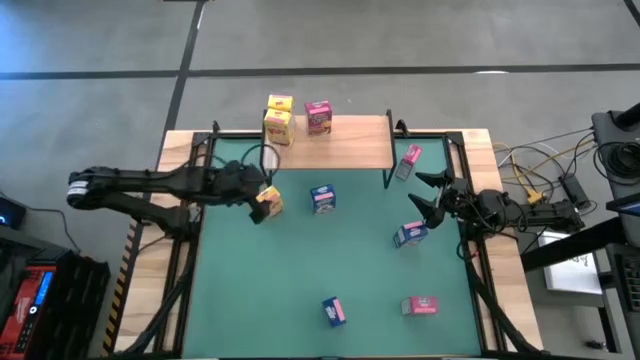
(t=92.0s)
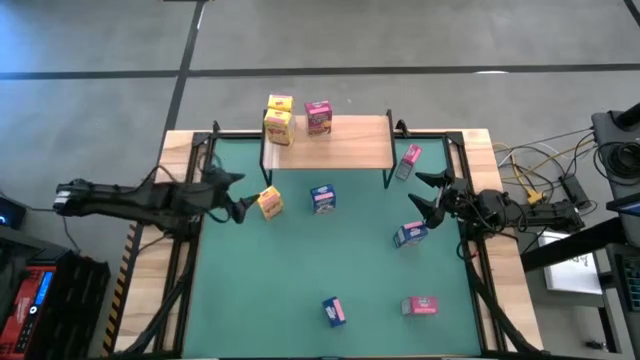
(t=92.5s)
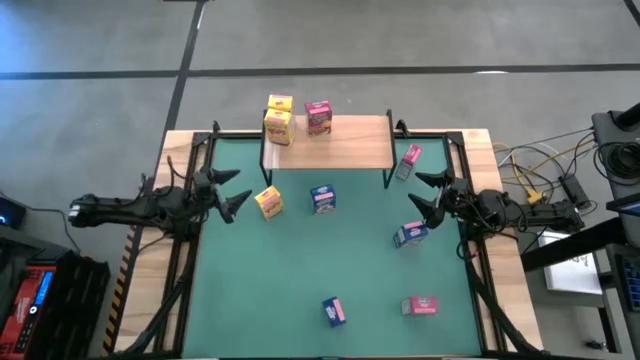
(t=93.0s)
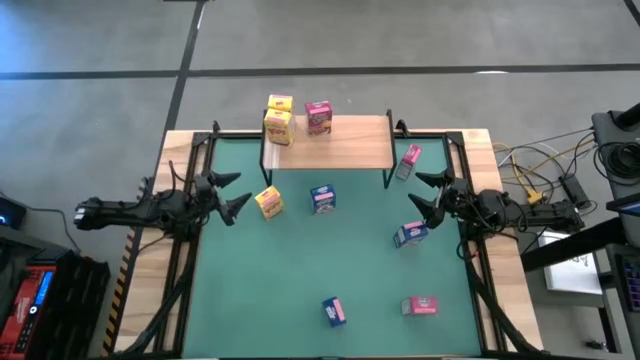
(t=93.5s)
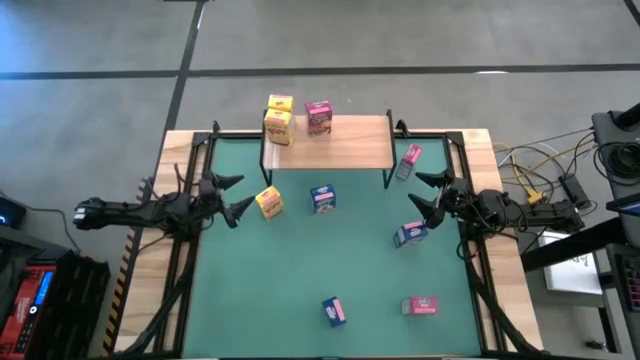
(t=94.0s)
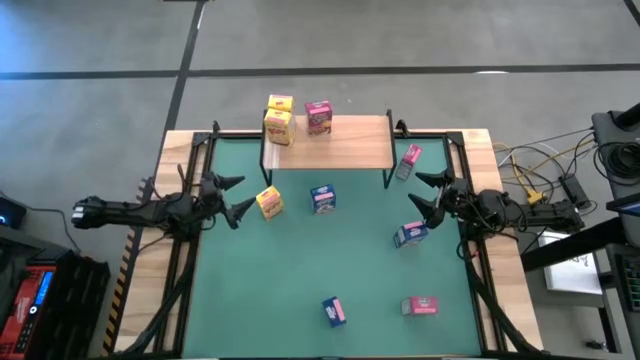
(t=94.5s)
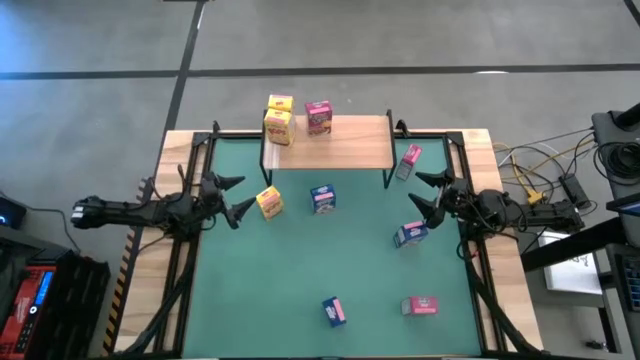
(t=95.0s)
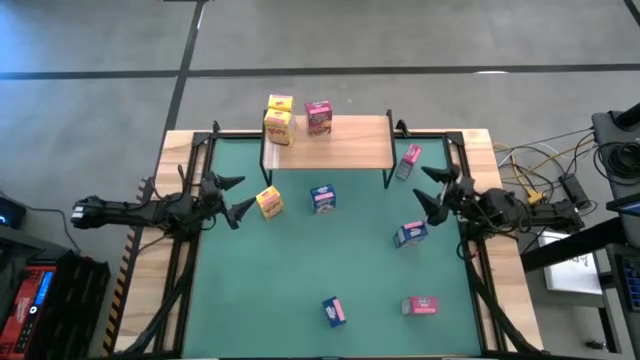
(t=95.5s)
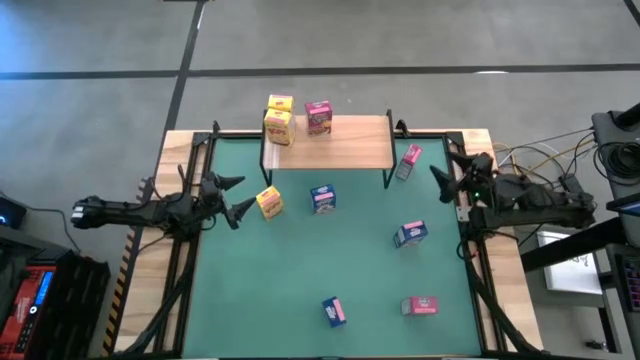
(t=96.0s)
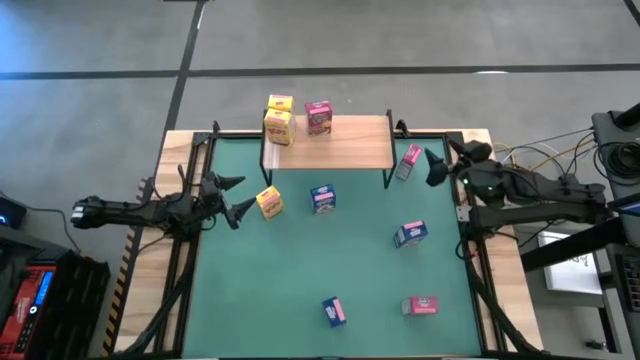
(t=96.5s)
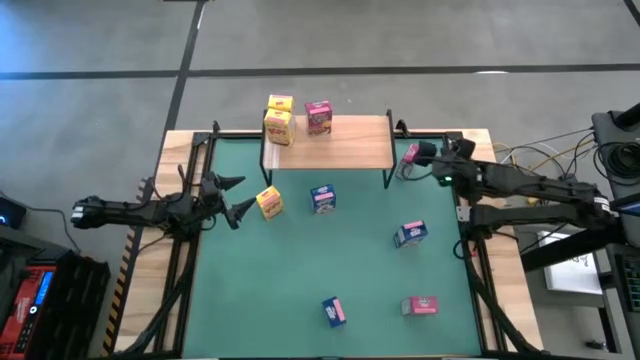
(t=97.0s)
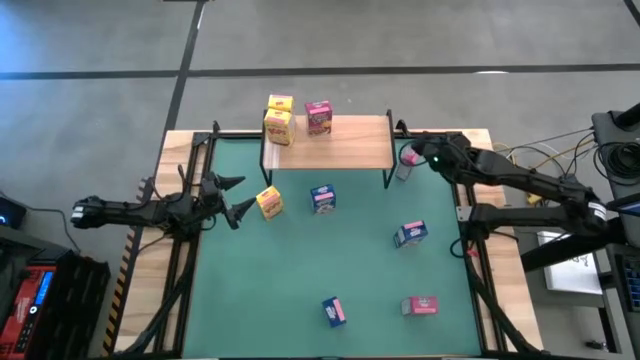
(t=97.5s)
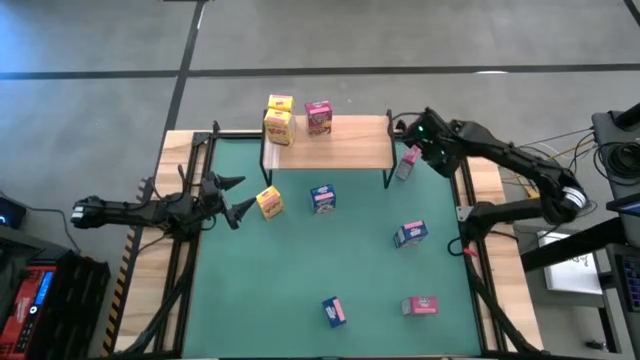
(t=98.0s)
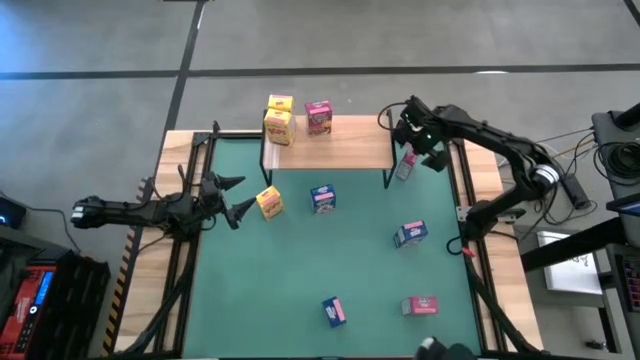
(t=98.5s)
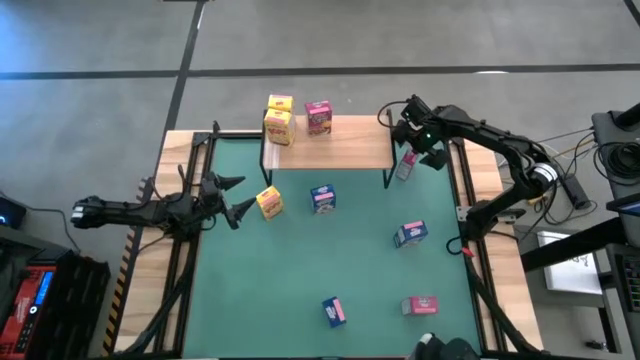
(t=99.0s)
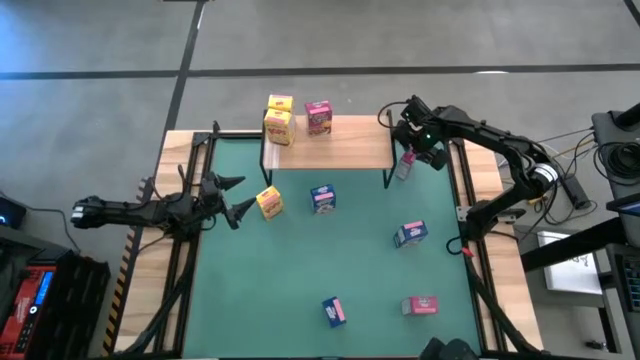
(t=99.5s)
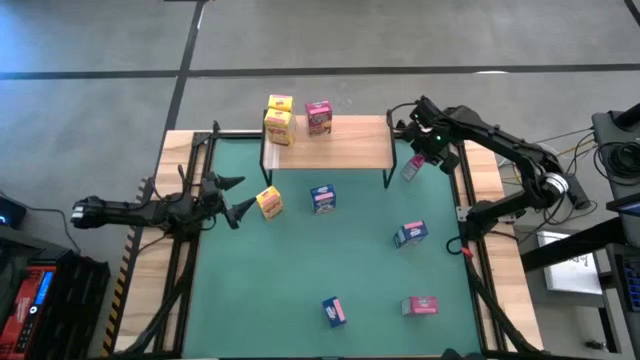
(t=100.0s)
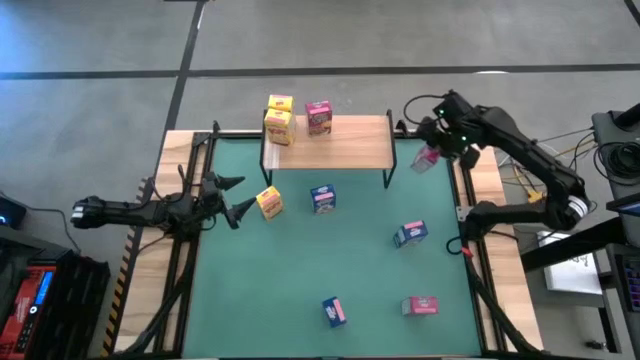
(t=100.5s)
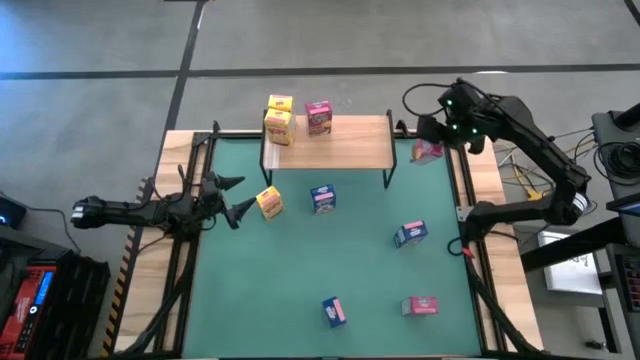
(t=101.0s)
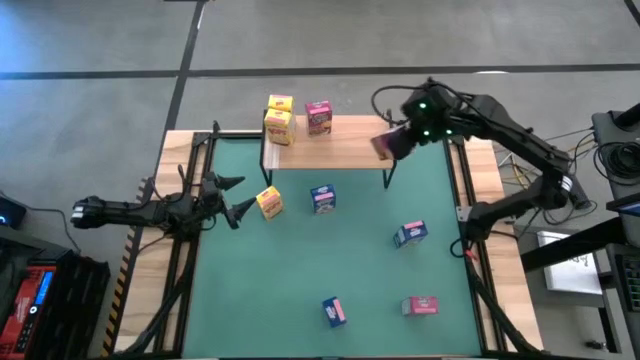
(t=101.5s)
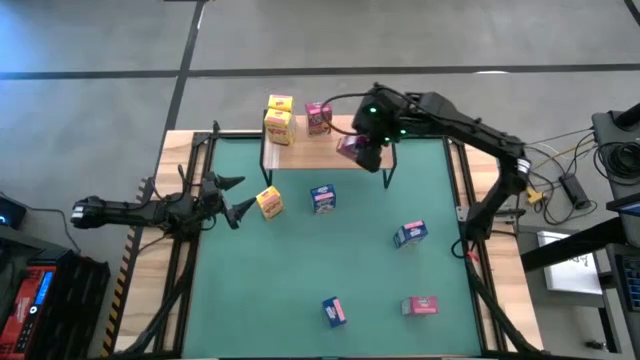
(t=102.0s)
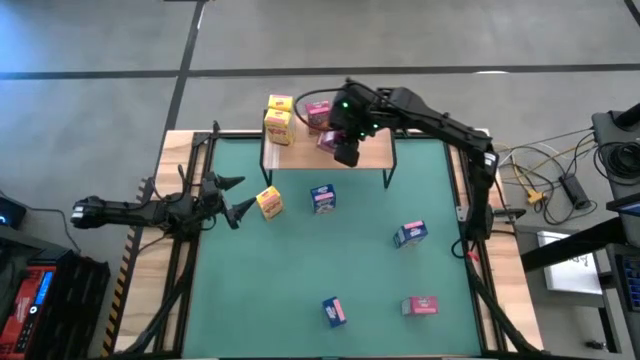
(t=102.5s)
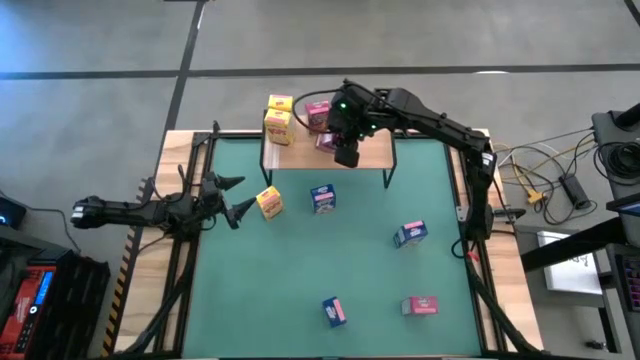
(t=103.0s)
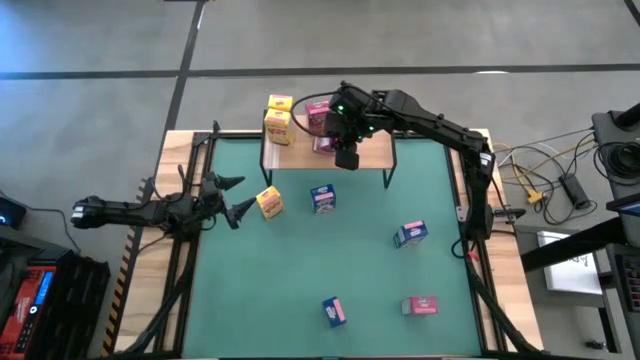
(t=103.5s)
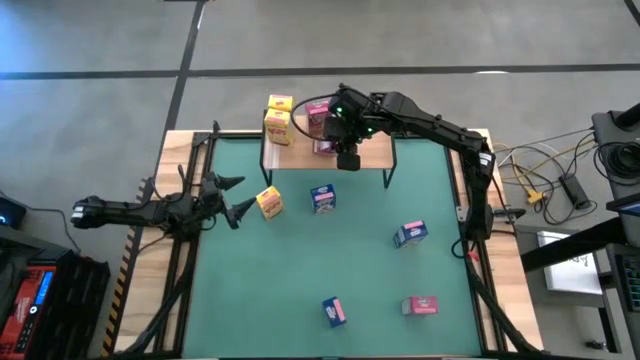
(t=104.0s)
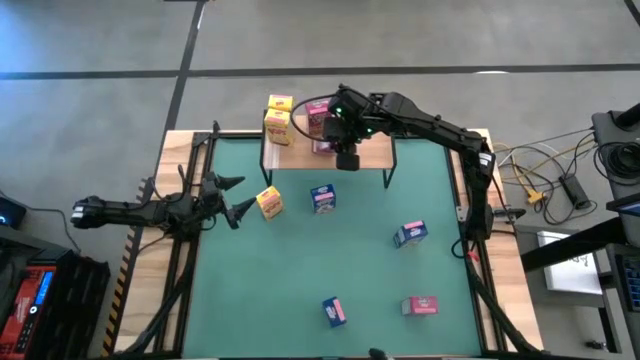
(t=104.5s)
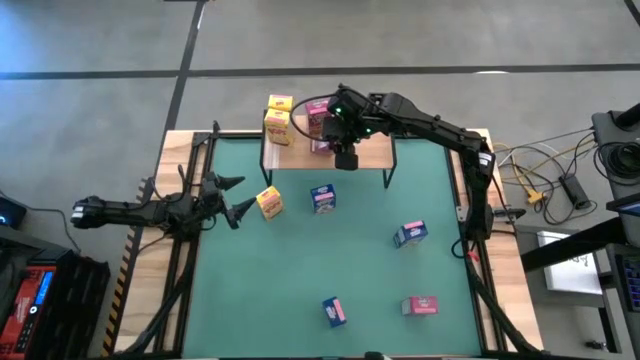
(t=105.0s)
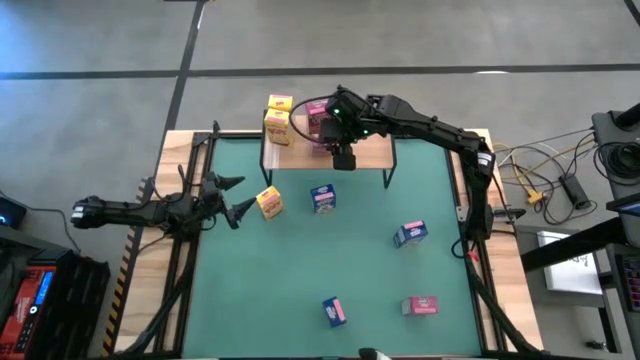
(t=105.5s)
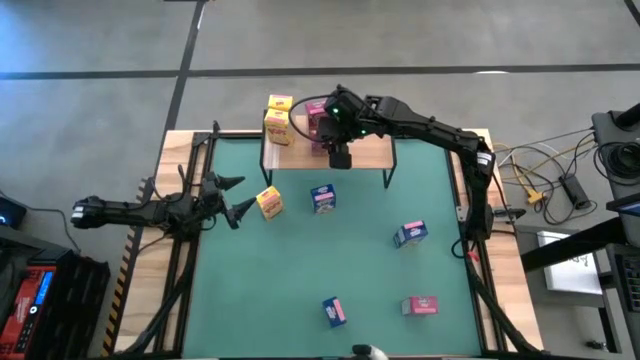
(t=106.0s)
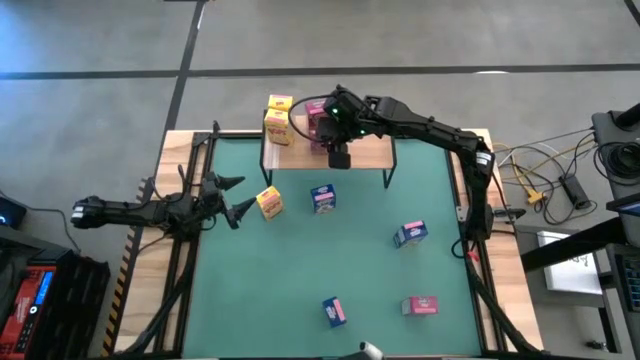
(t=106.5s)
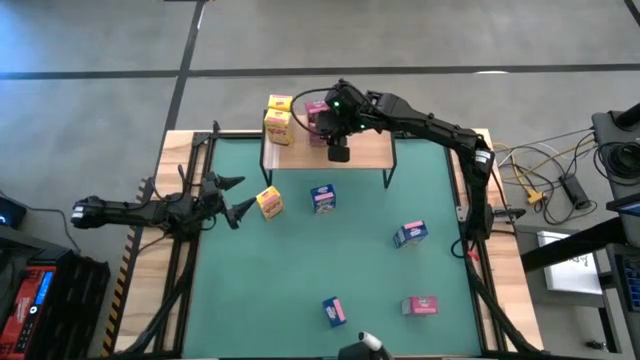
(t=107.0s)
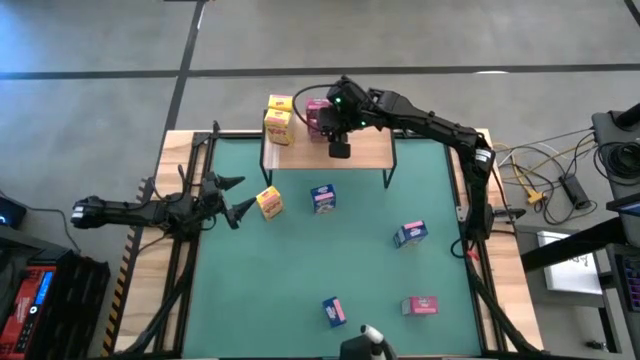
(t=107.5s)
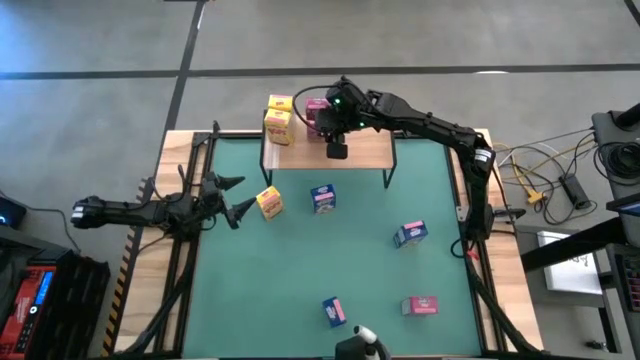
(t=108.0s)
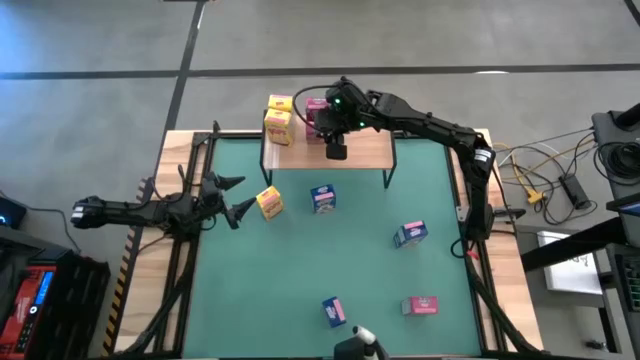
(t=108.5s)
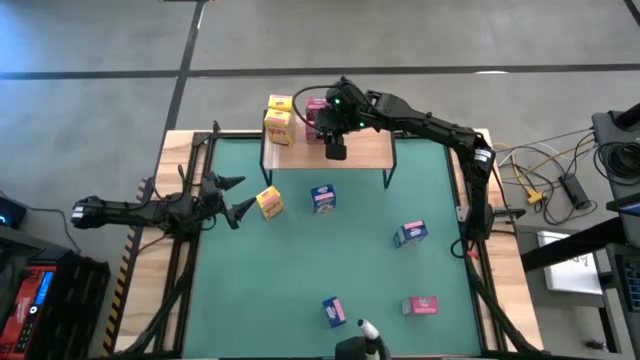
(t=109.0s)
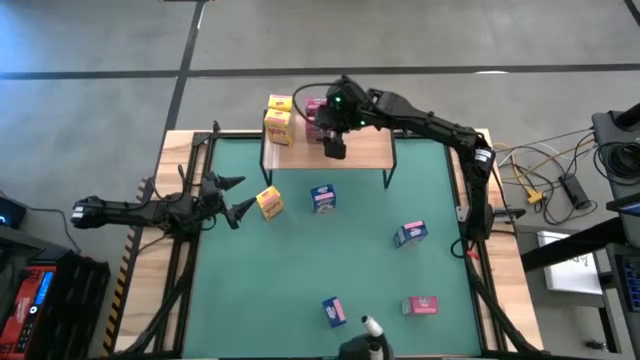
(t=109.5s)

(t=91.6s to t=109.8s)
Task: Stack cereal on shelf
Put the top purple cereal box on the shelf

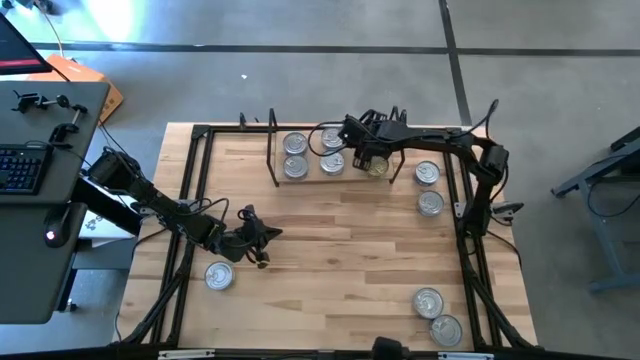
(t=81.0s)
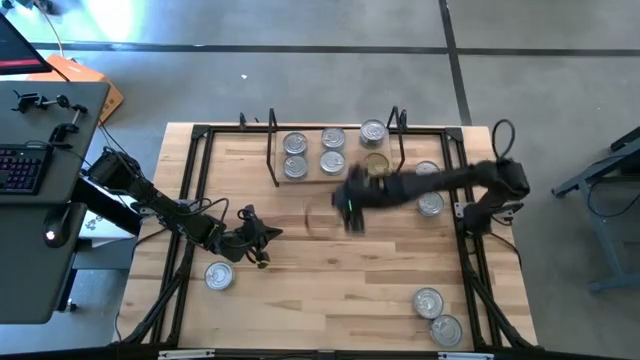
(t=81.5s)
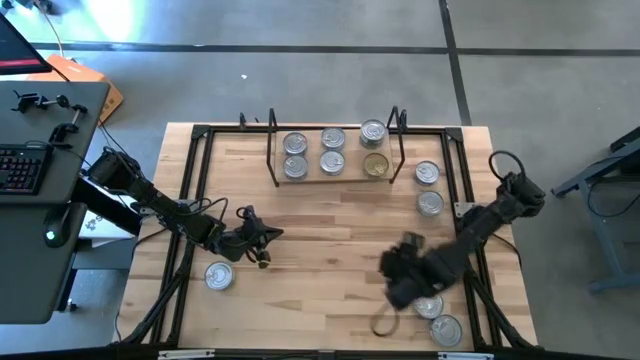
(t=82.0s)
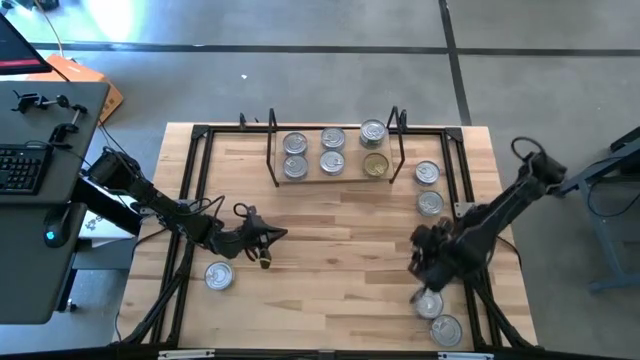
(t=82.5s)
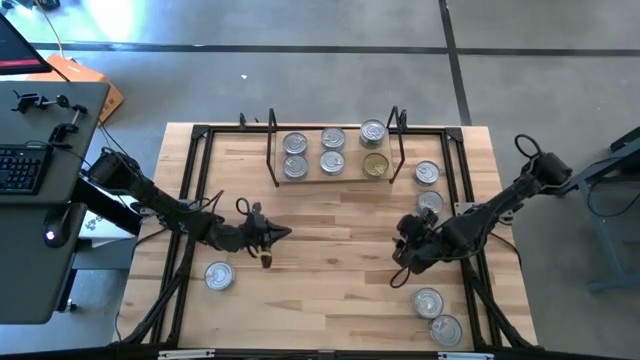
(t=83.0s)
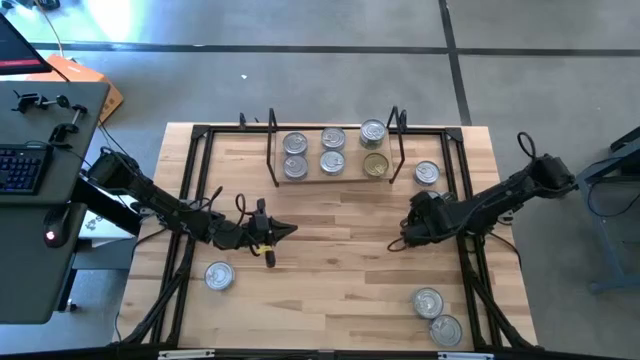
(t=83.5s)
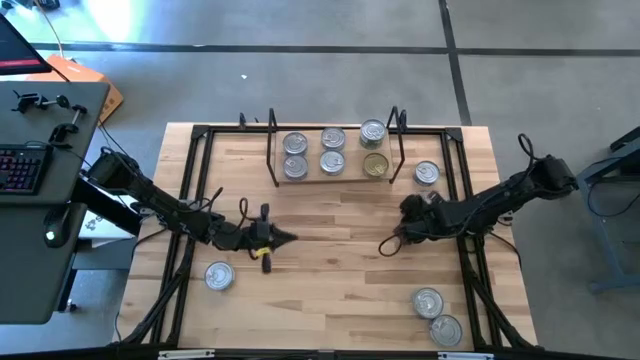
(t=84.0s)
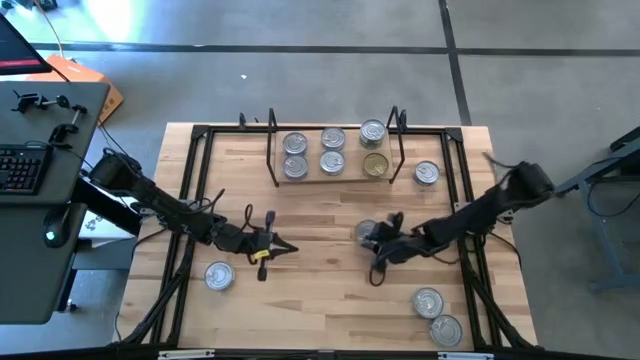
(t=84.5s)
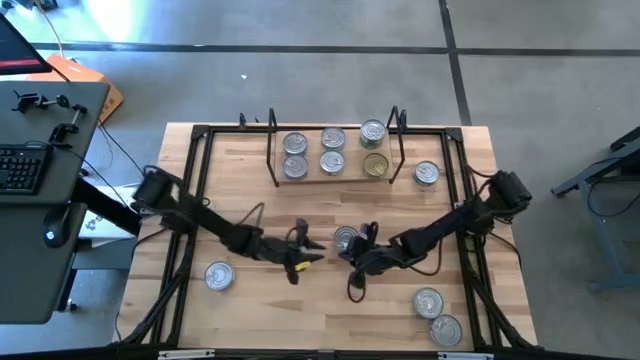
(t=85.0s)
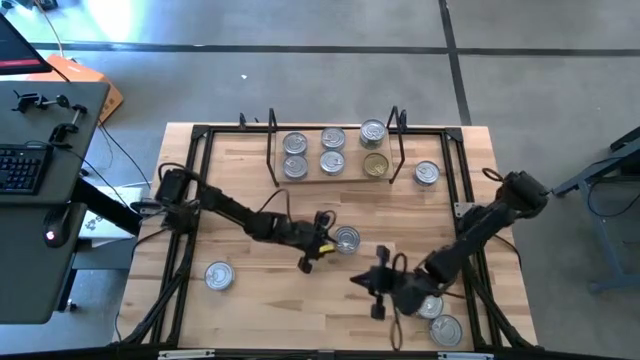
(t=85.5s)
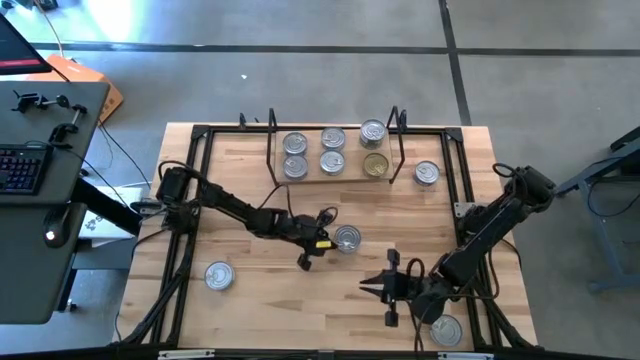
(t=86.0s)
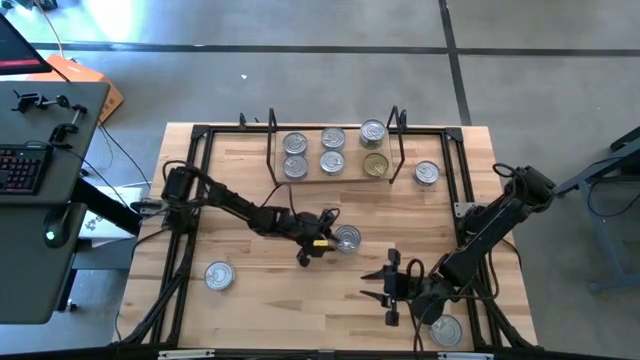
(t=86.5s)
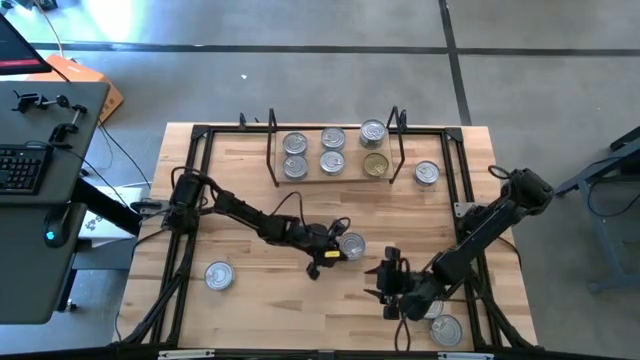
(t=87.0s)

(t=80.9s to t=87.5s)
Task: Stack canned seafood by type on shelf
Stack the light blue tuna can on top of the light blue tuna can on the shelf
